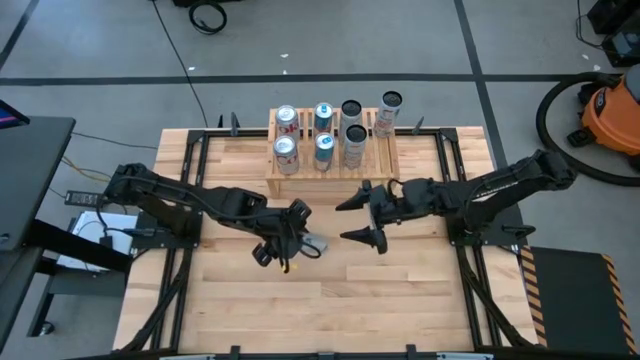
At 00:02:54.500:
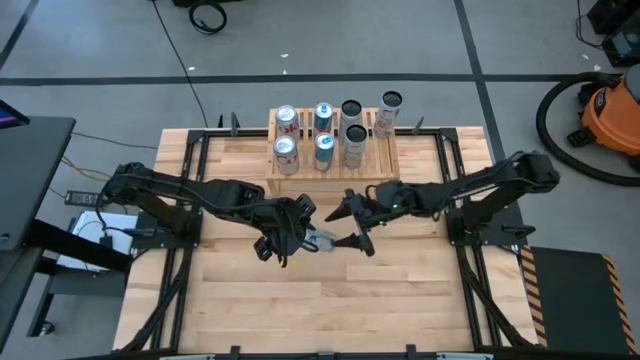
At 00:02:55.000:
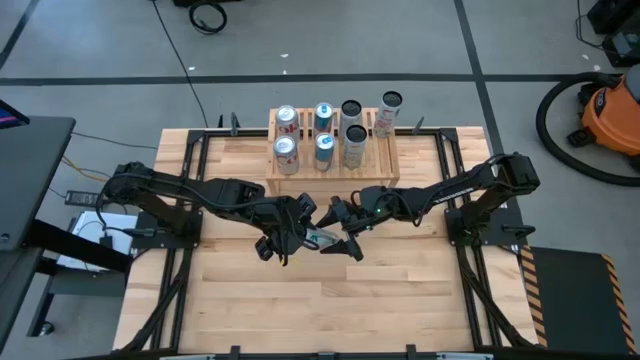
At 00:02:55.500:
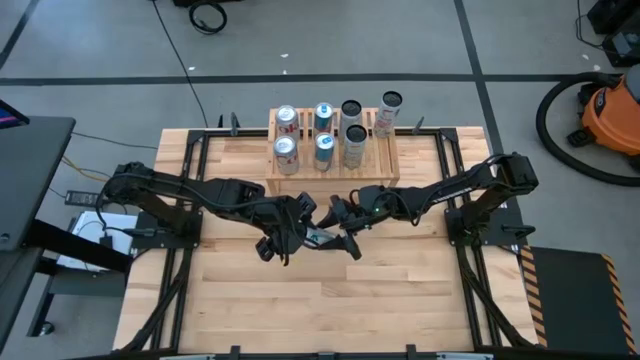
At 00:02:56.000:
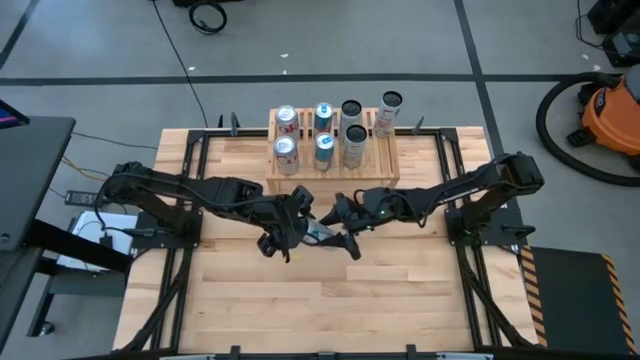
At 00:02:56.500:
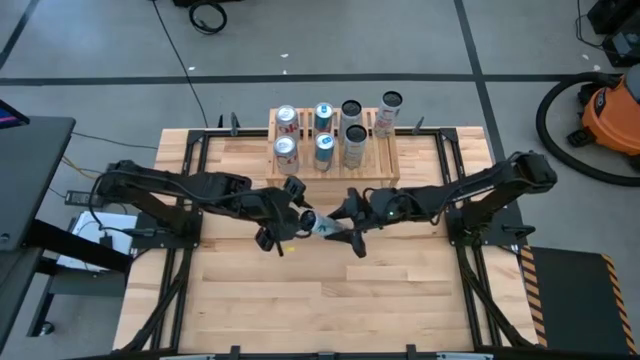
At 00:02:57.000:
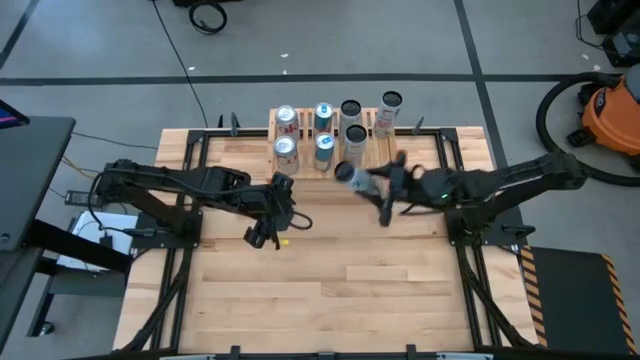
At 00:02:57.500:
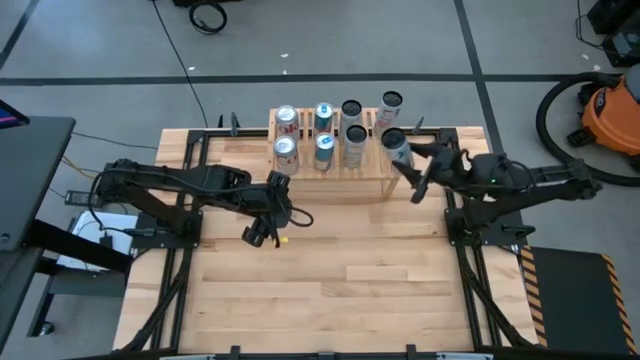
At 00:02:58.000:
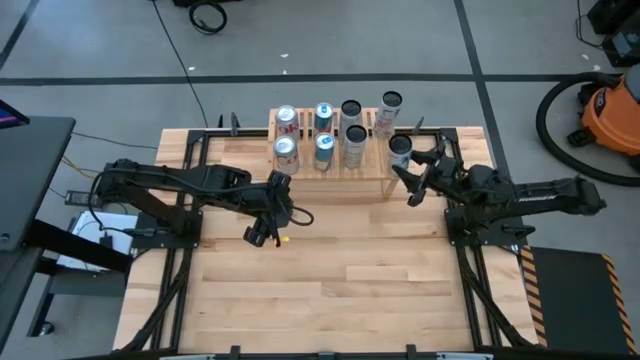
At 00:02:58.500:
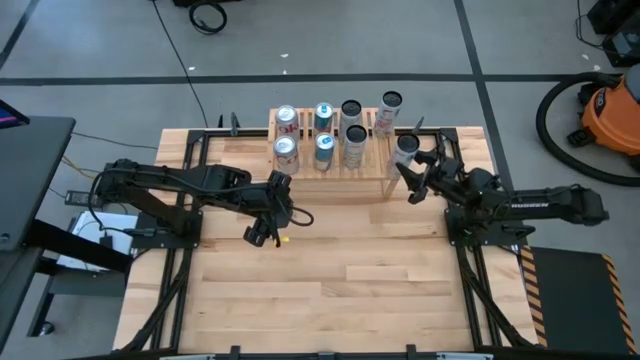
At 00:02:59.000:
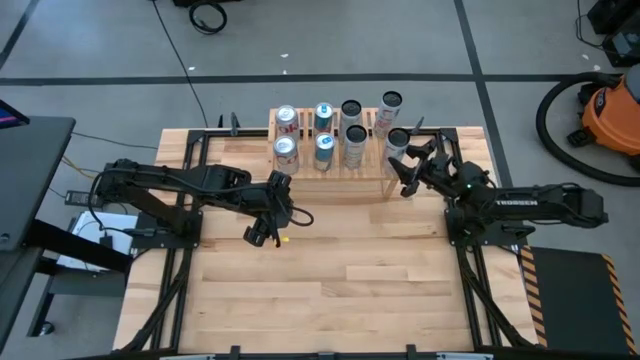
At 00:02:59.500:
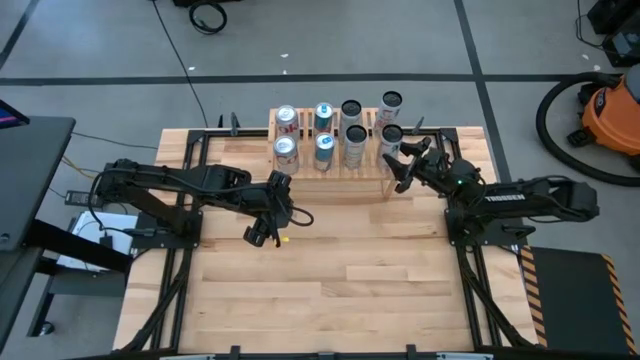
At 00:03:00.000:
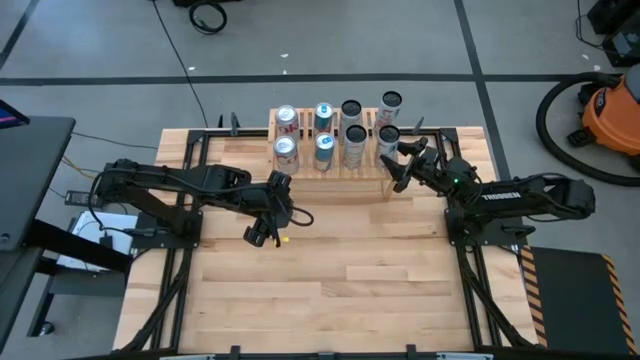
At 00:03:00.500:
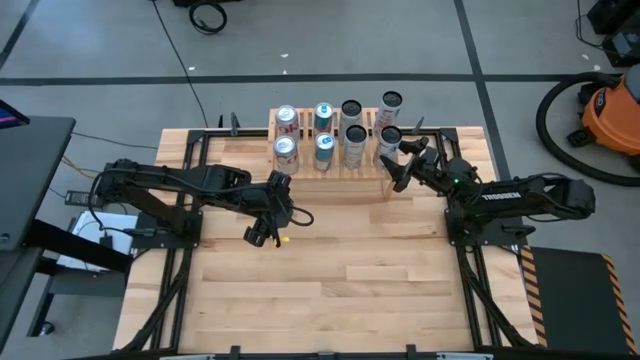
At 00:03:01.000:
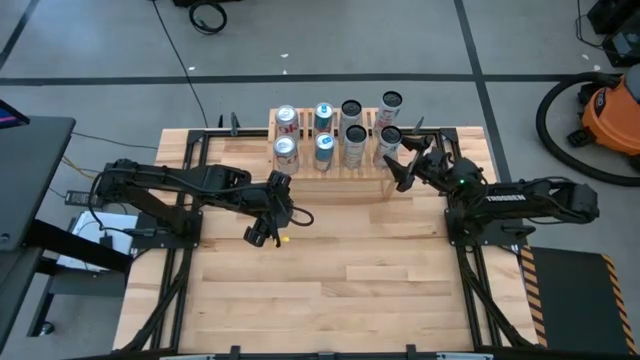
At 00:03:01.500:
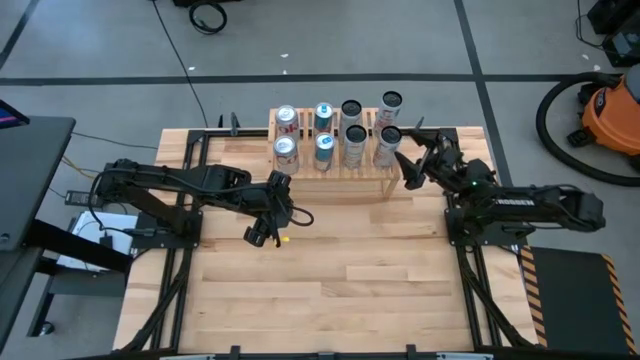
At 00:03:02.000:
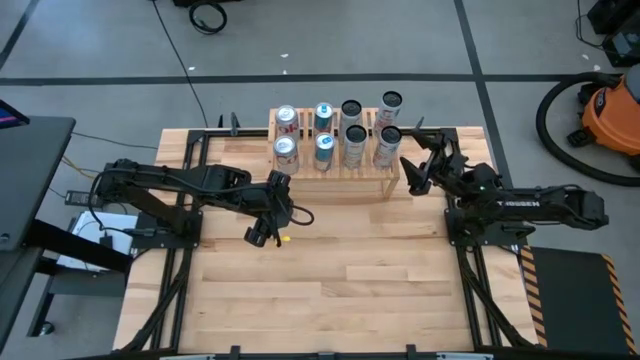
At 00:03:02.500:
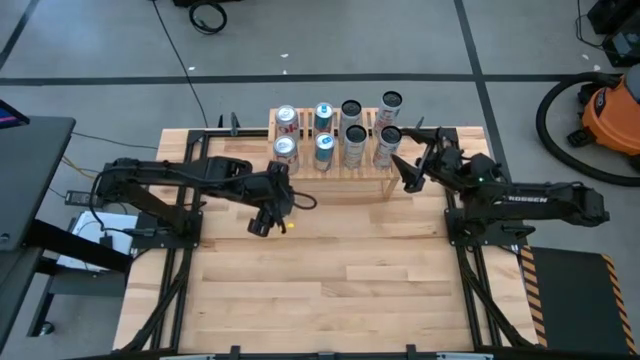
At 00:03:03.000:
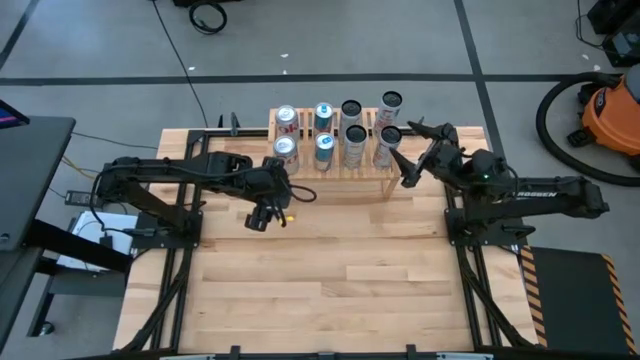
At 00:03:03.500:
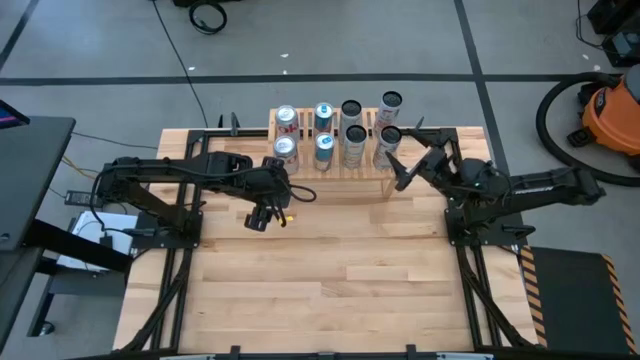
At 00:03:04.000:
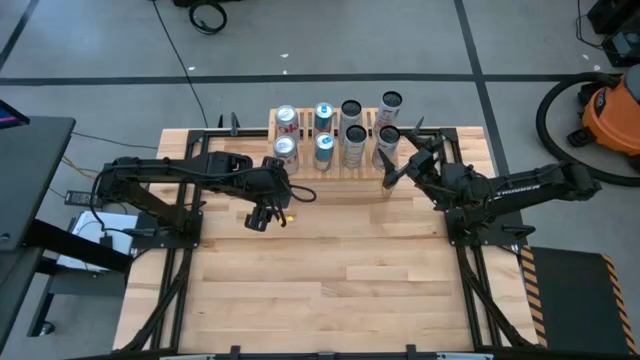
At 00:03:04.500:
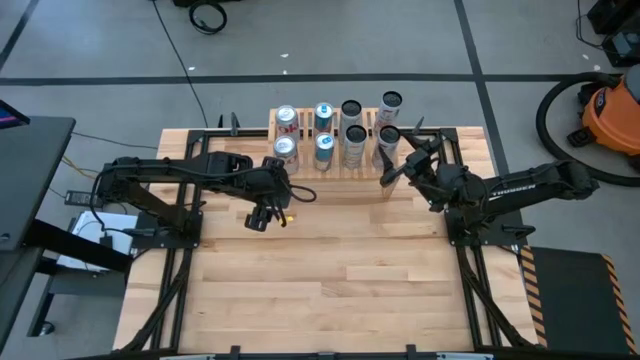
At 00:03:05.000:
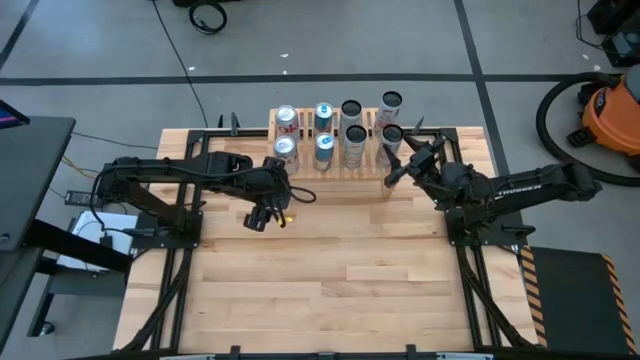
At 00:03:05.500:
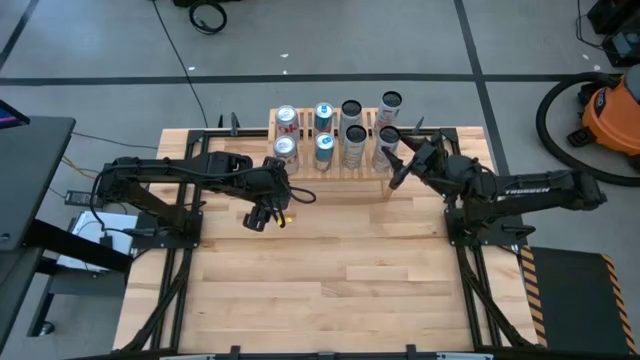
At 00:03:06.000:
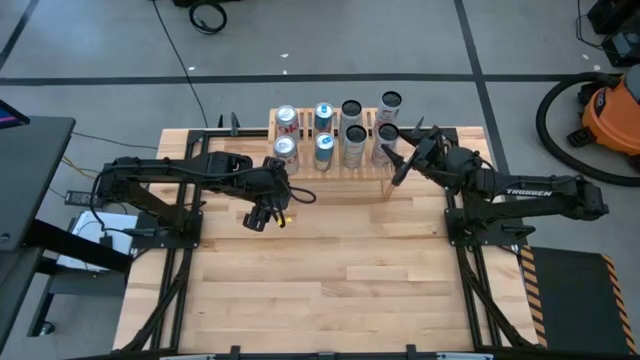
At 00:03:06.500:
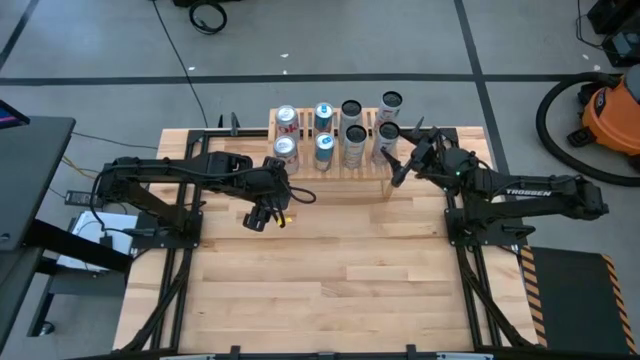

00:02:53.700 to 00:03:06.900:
Task: Place canned beverage on shelf
Put the white-pink soda can aligned with the other white-pink soda can on the shelf

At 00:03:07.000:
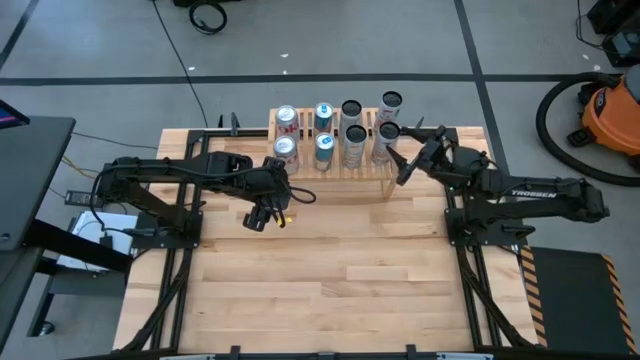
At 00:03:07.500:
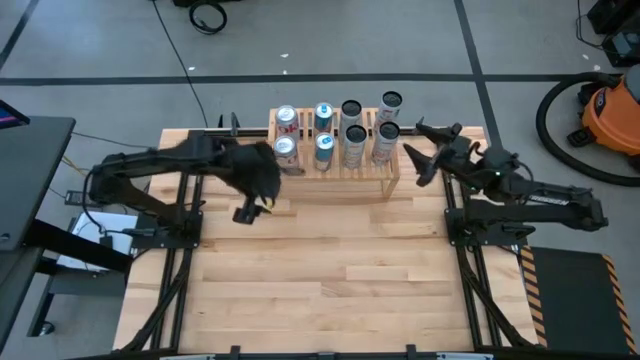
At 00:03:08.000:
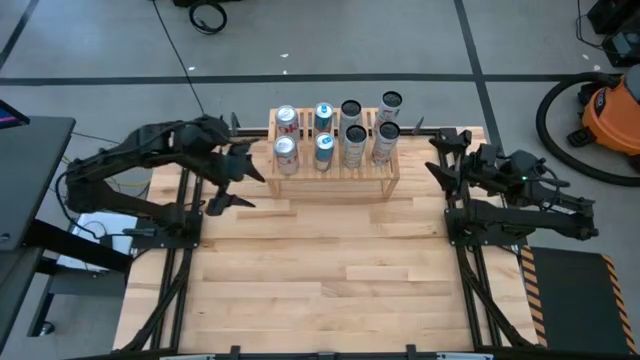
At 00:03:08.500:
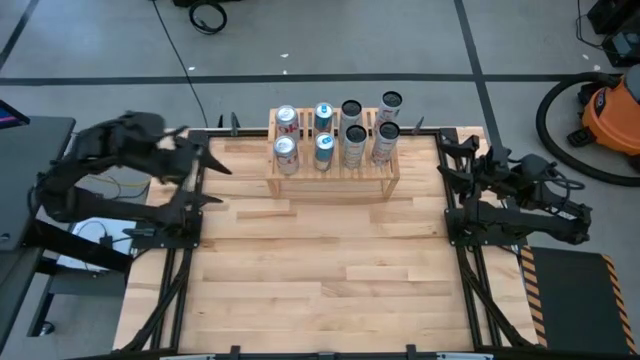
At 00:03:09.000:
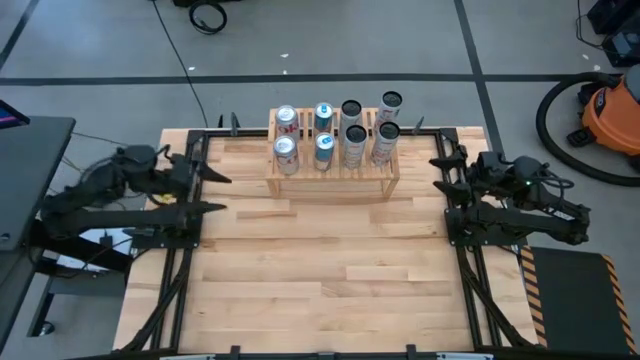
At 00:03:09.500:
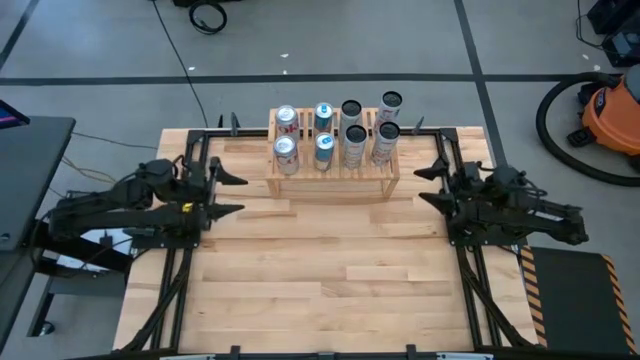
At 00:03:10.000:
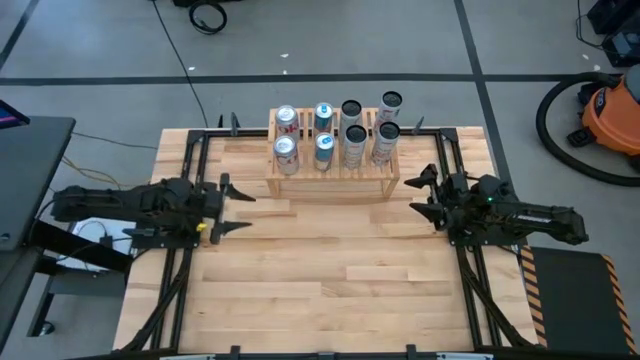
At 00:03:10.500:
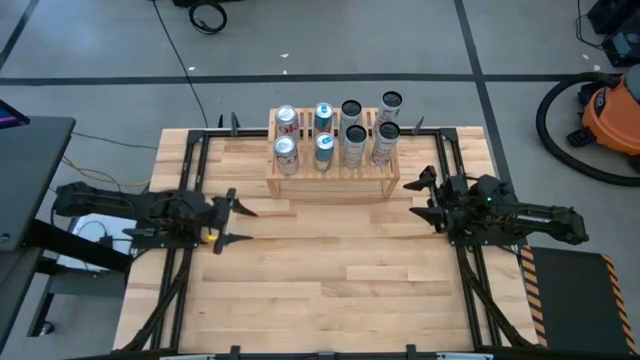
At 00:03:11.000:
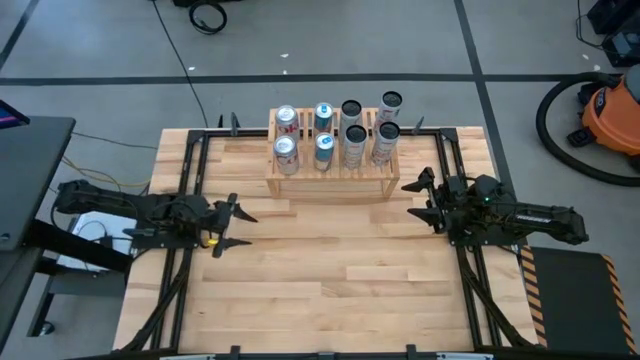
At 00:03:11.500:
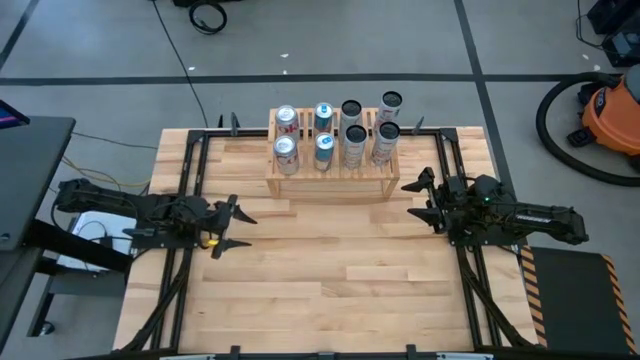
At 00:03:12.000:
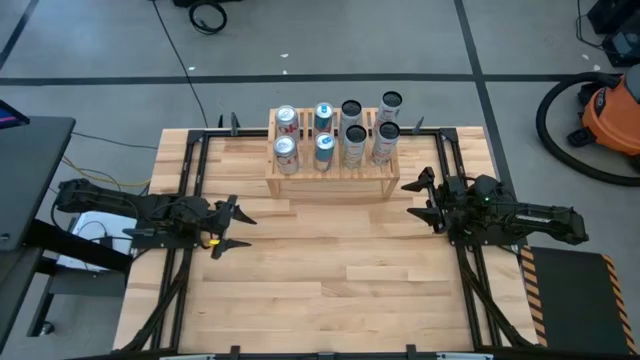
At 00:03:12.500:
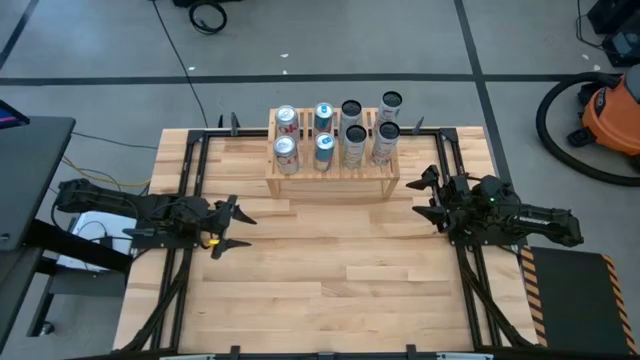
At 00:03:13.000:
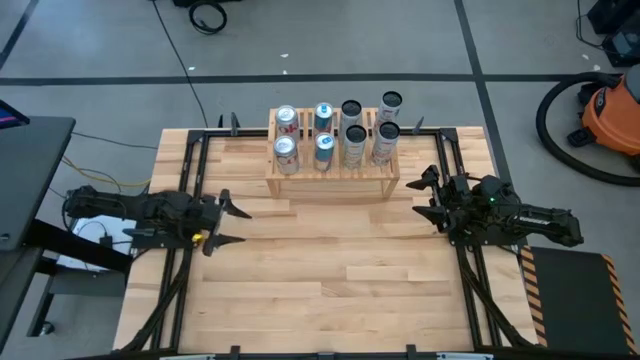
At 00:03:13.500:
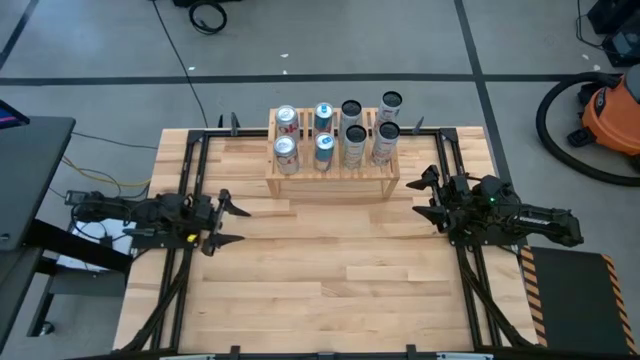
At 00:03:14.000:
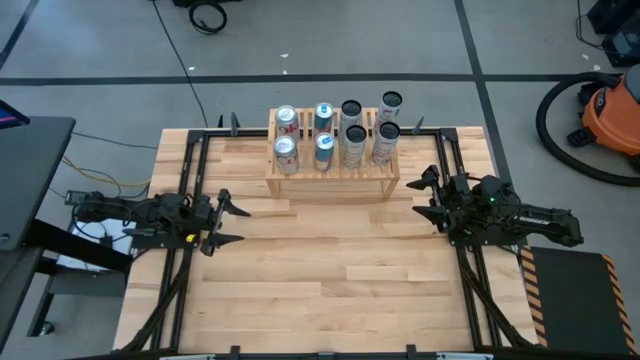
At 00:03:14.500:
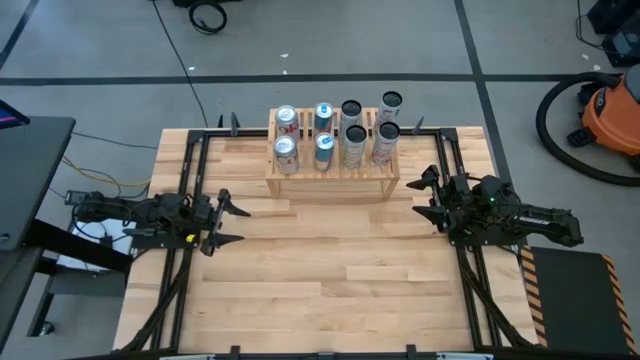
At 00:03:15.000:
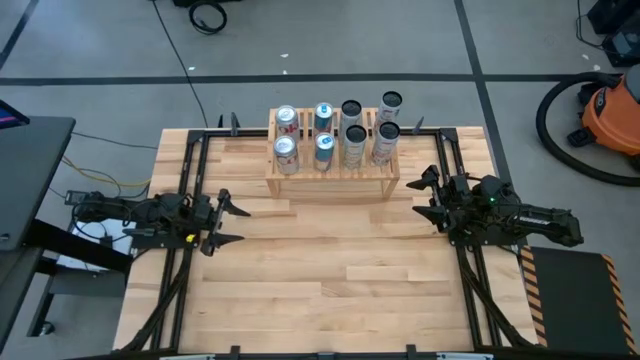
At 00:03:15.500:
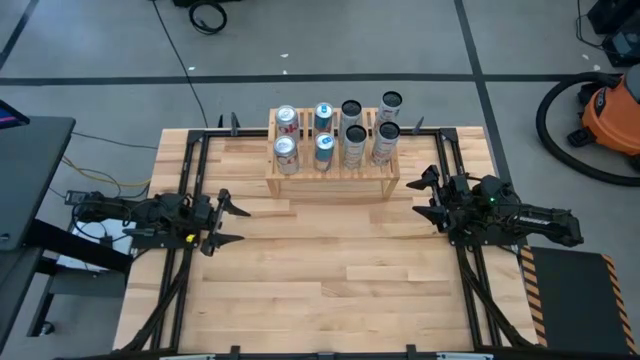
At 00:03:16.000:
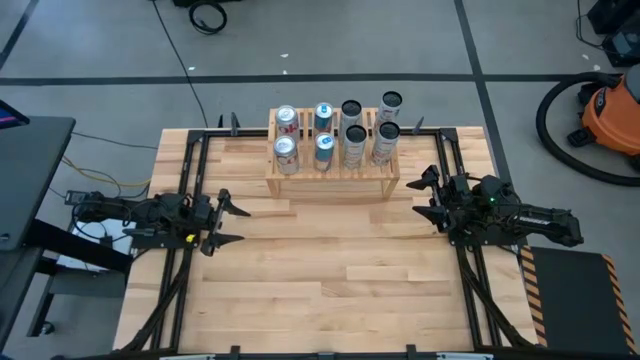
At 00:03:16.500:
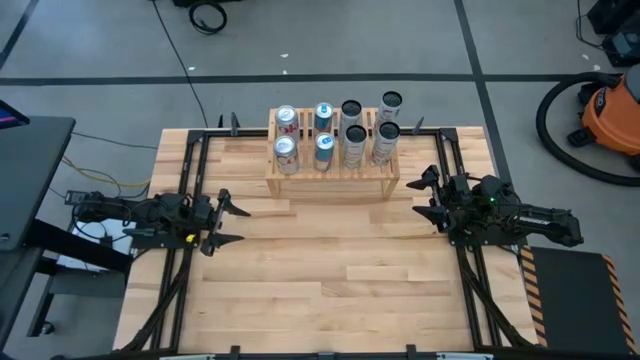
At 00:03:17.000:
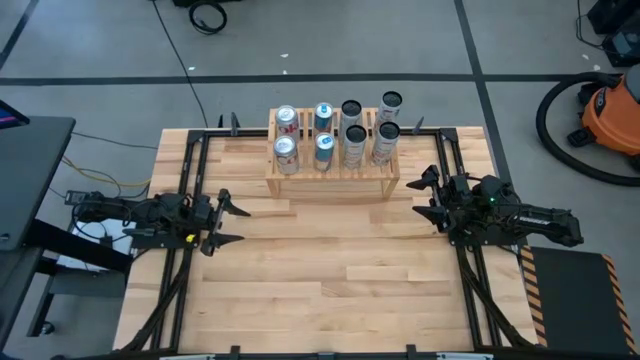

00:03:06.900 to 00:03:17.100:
Return to Home Position
